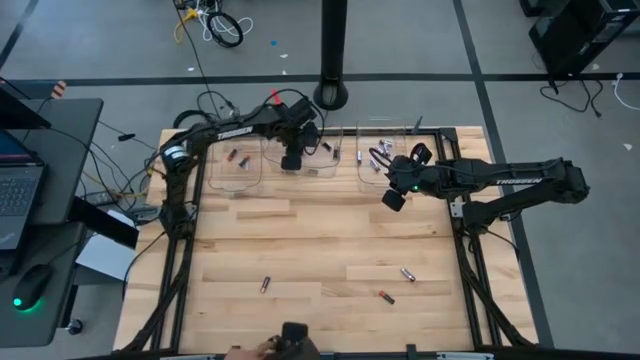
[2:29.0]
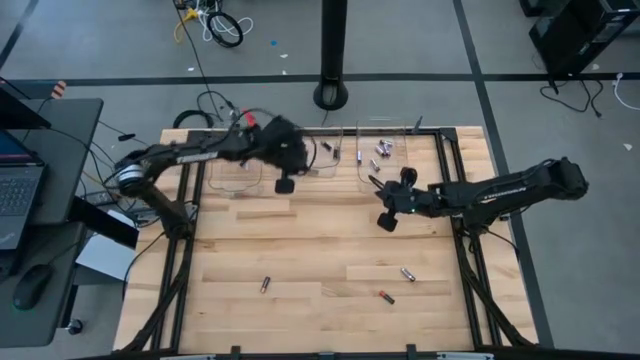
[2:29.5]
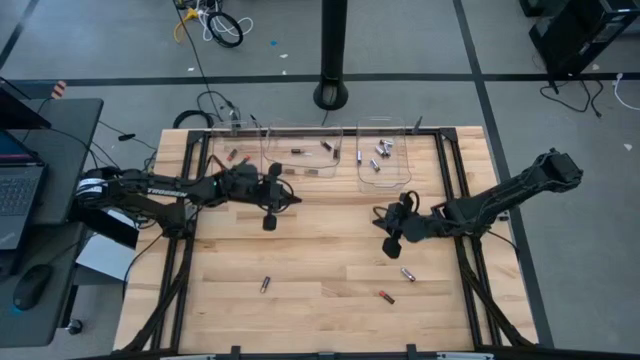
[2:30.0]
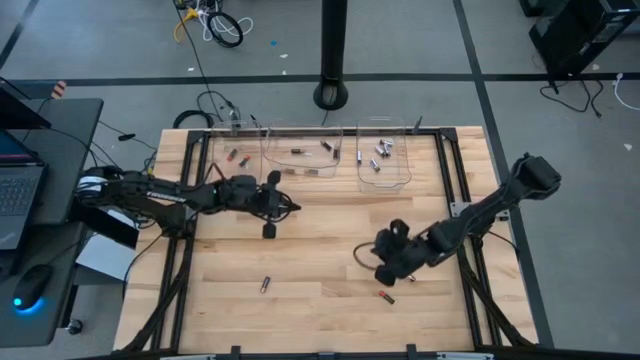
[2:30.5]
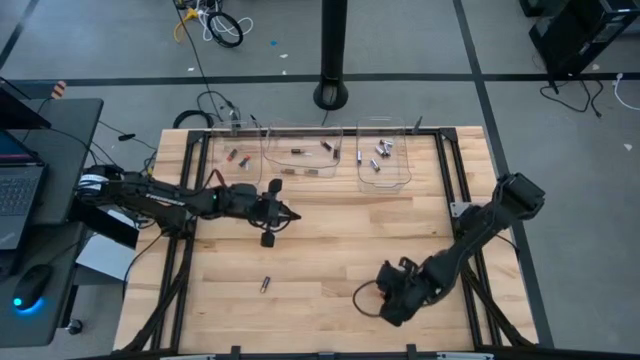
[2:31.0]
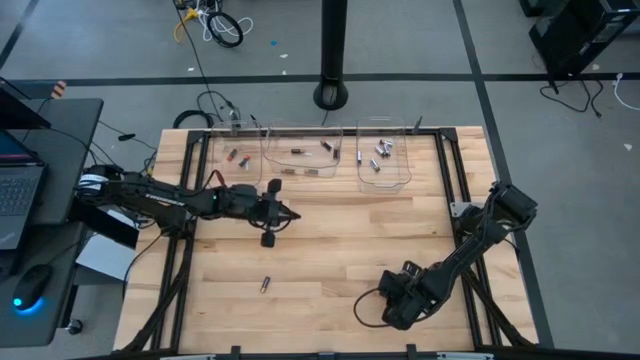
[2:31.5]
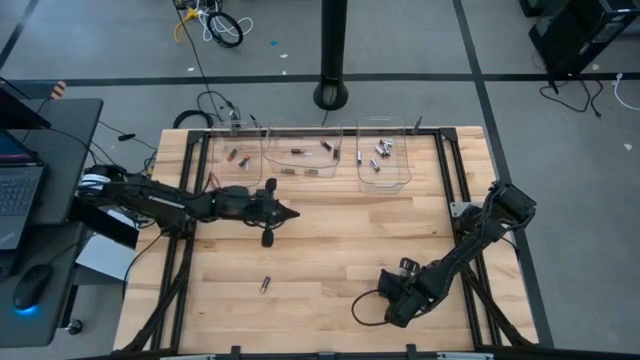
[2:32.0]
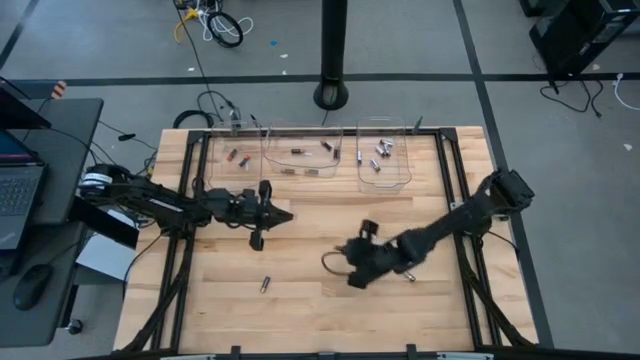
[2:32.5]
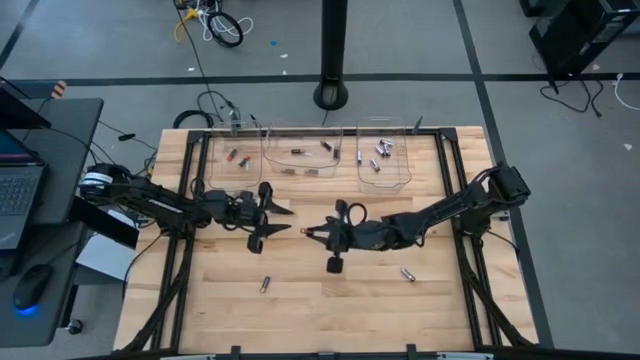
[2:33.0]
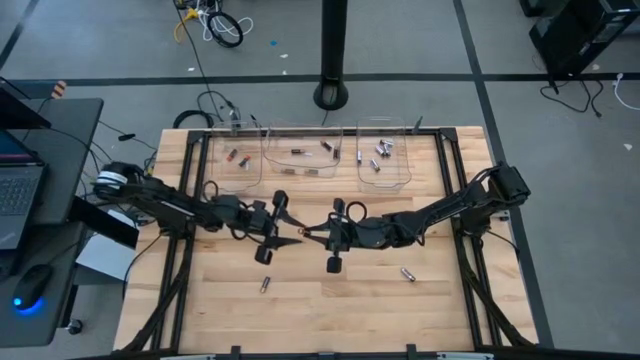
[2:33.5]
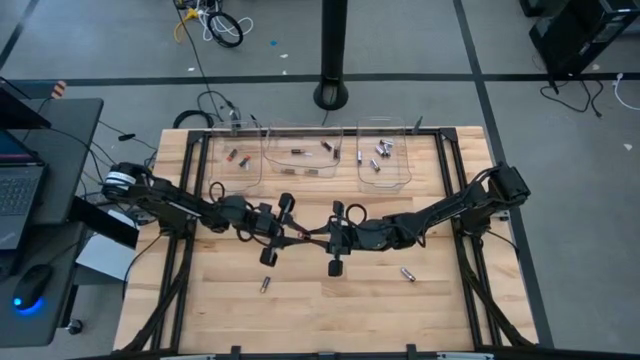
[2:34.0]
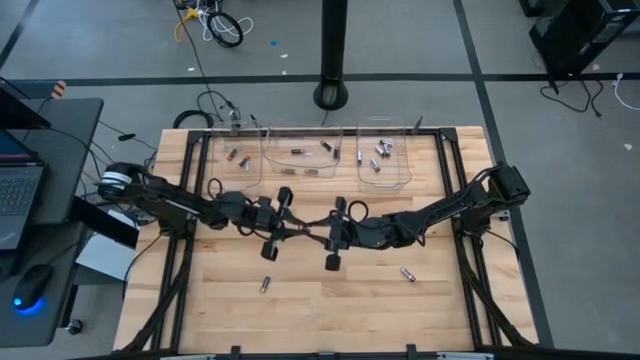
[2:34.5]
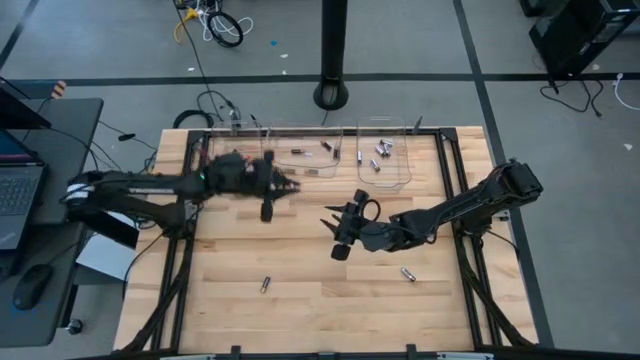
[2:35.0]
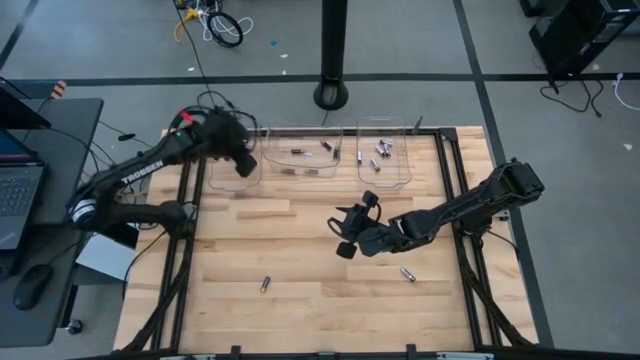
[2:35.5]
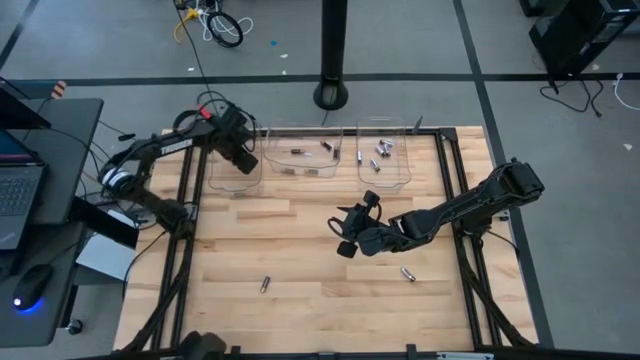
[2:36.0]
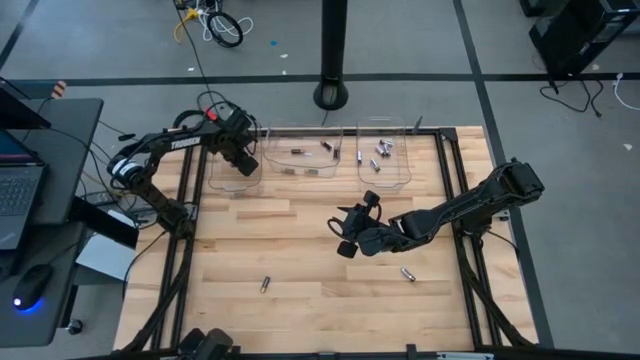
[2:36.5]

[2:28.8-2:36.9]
Task: Sort batteries
Put the orange battery into the left transparent bin

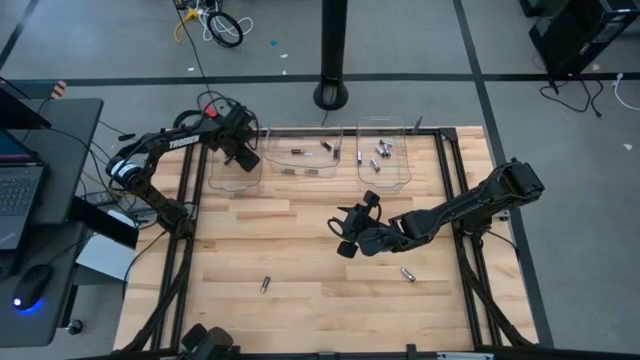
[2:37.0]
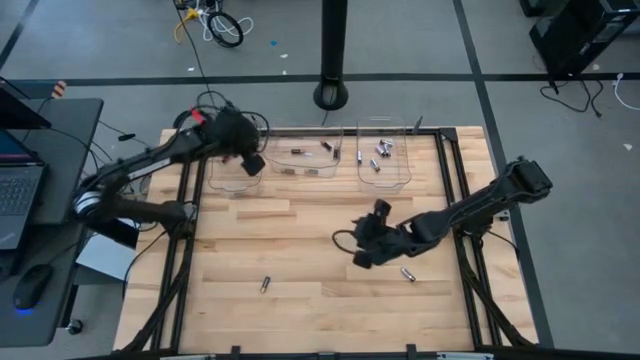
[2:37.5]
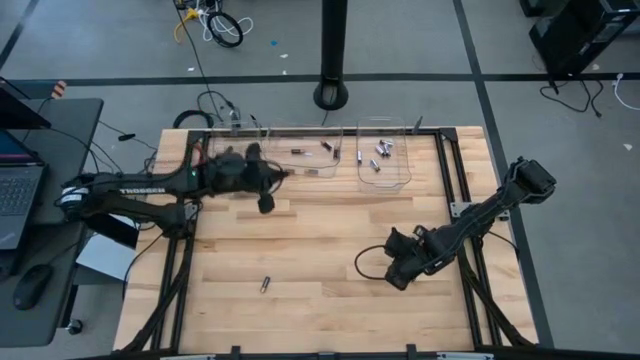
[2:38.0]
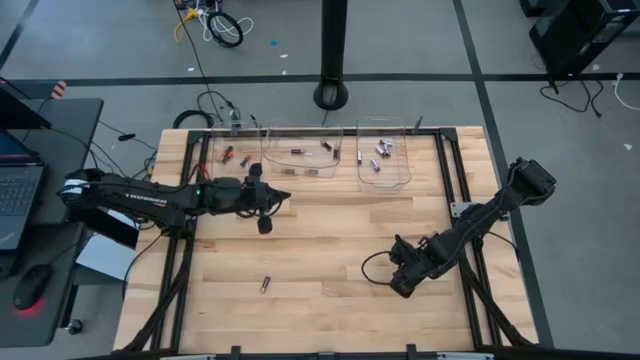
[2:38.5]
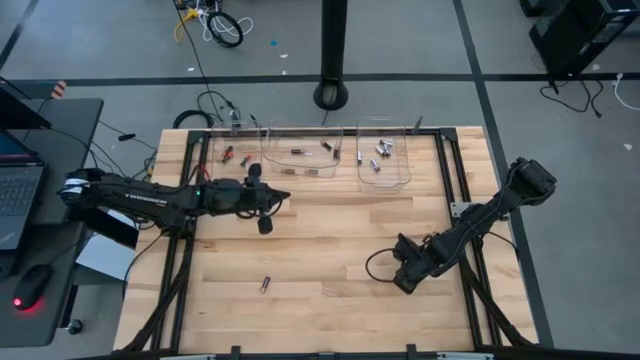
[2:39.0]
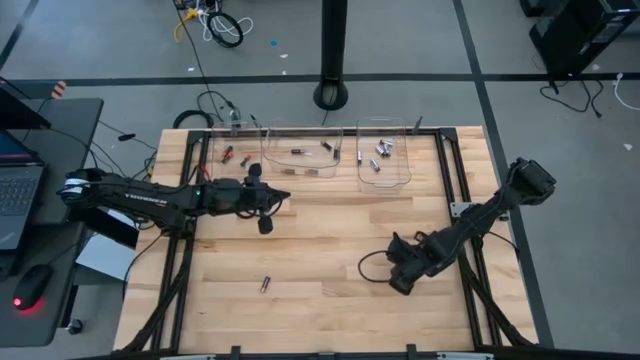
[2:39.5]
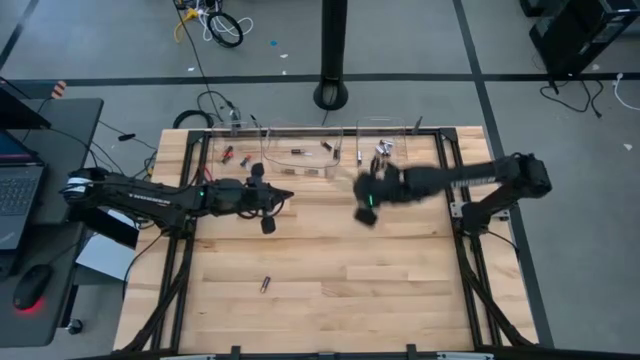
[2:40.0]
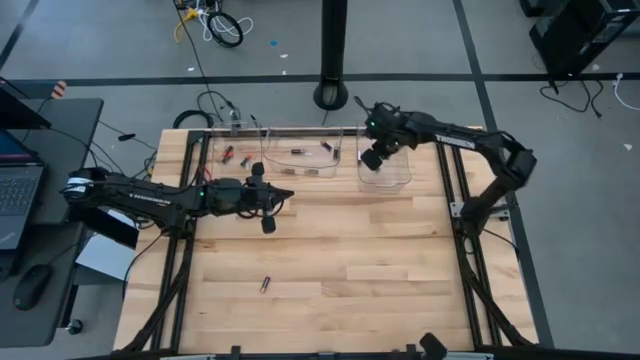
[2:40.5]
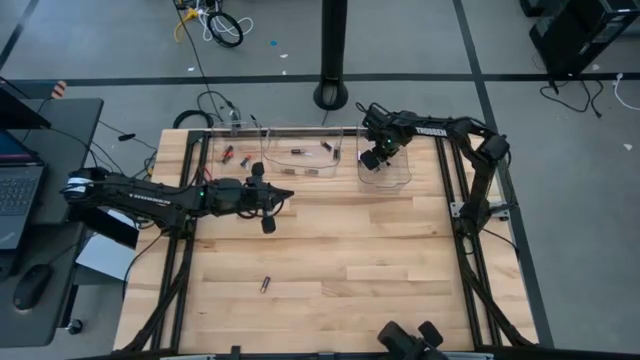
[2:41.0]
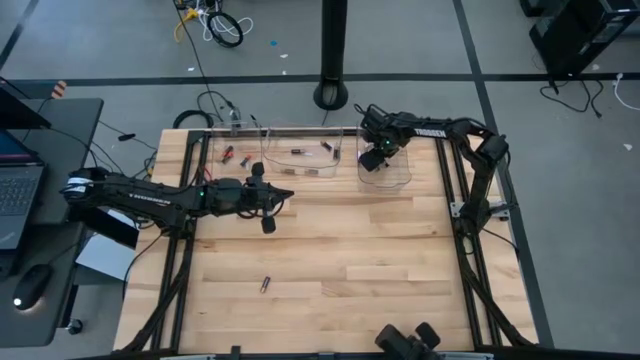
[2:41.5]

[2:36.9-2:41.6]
Put the silver battery into the right transparent bin

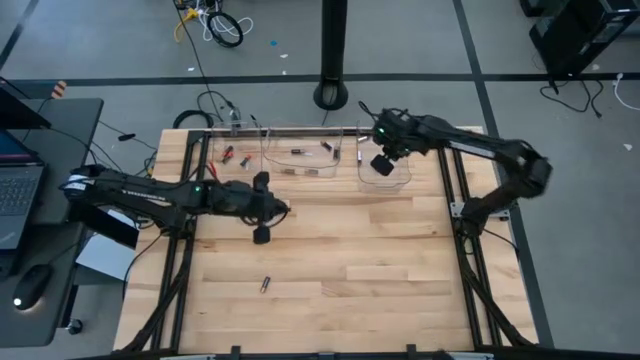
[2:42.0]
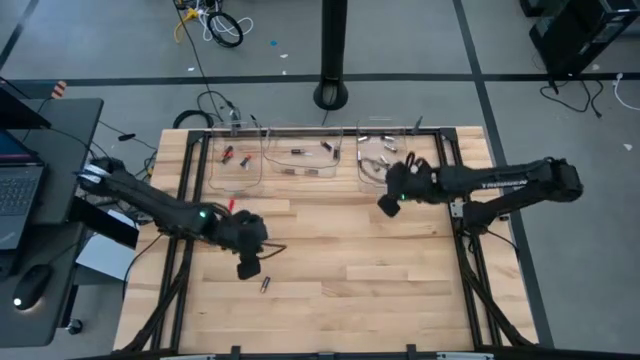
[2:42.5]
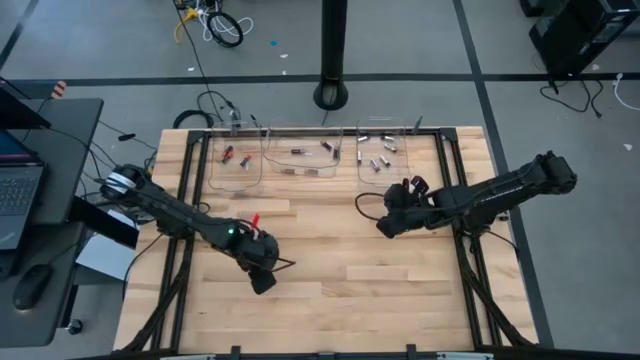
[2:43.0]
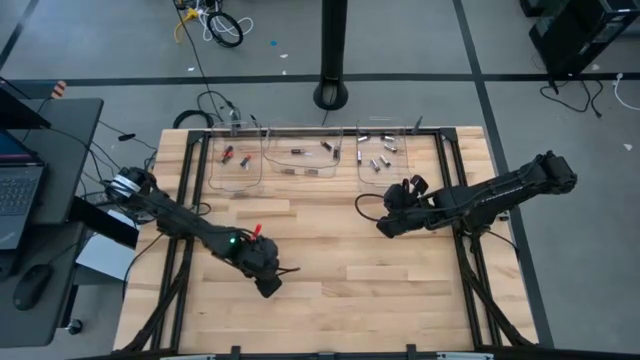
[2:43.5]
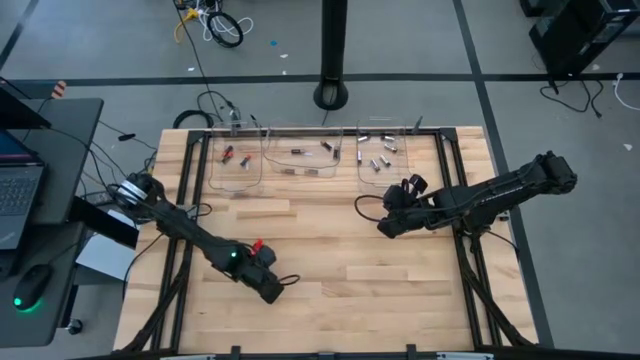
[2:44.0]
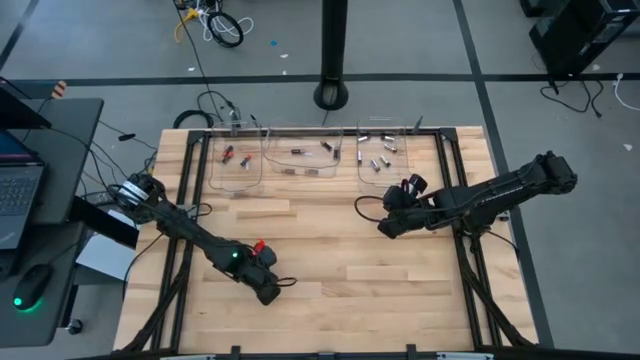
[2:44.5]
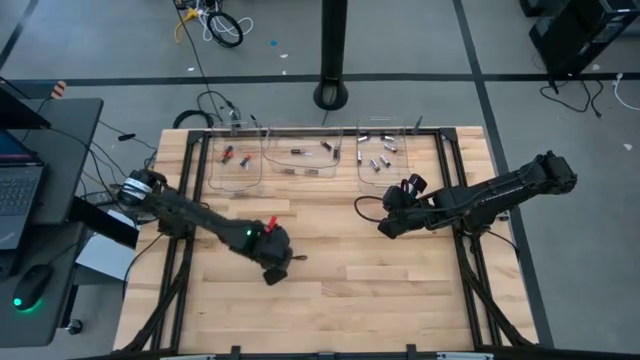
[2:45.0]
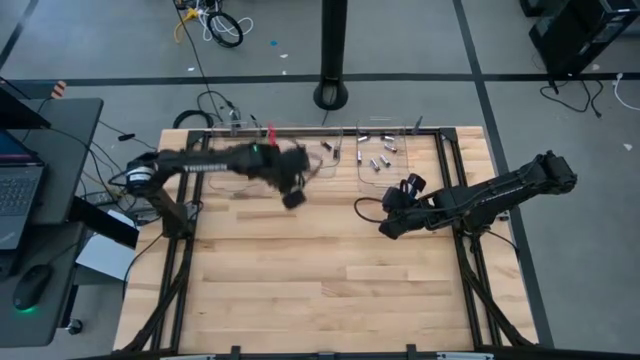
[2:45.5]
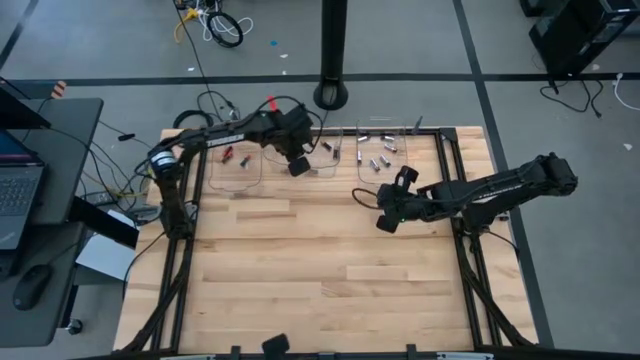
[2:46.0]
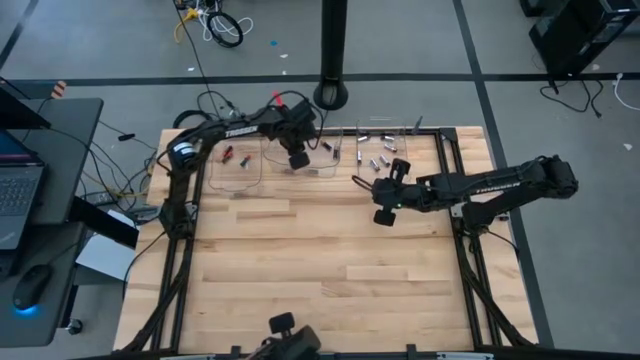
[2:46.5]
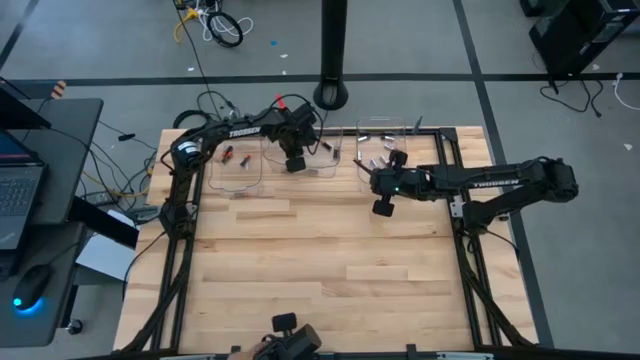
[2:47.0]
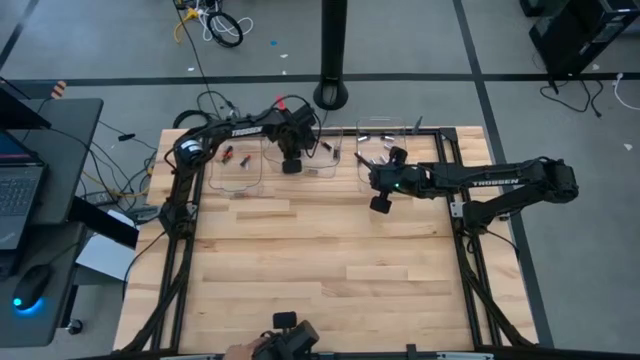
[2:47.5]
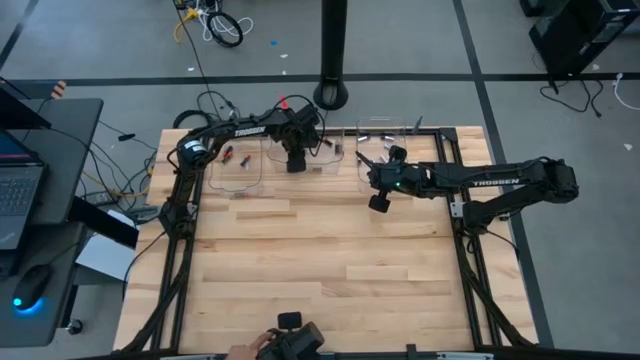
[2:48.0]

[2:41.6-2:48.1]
Put the black battery into the right transparent bin
